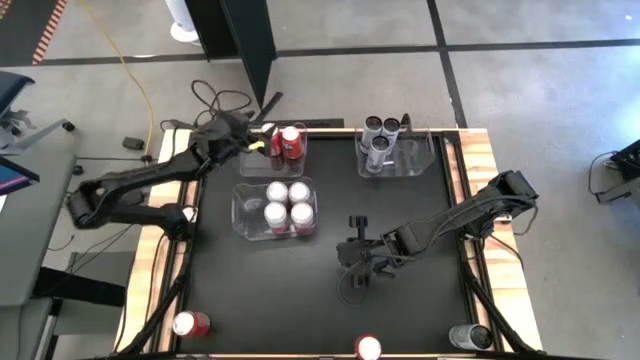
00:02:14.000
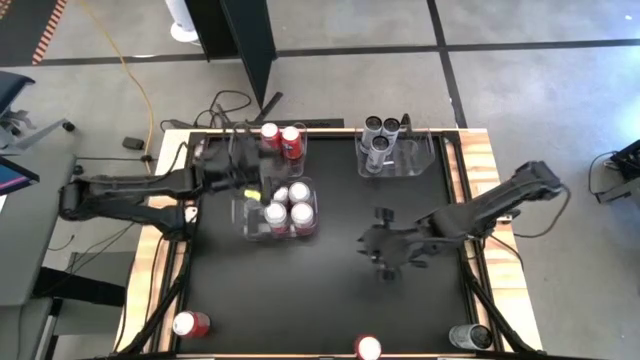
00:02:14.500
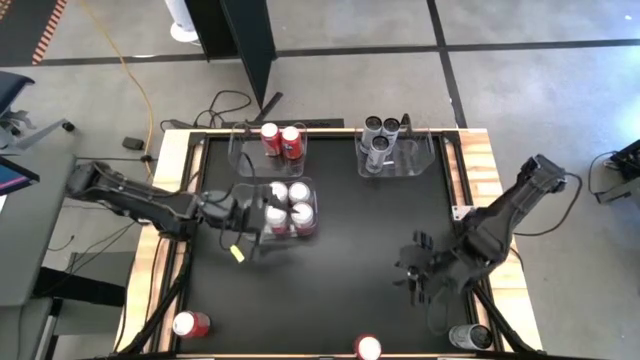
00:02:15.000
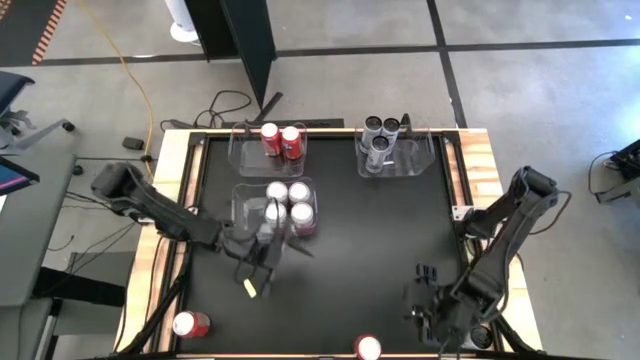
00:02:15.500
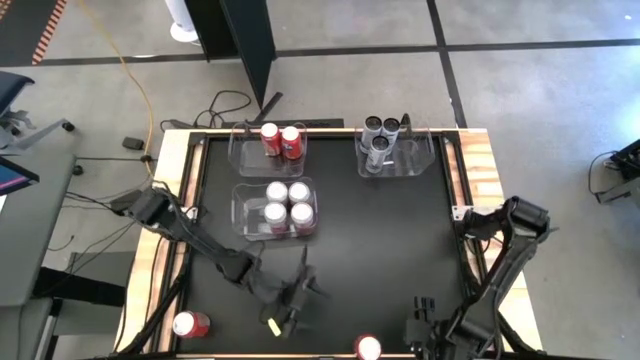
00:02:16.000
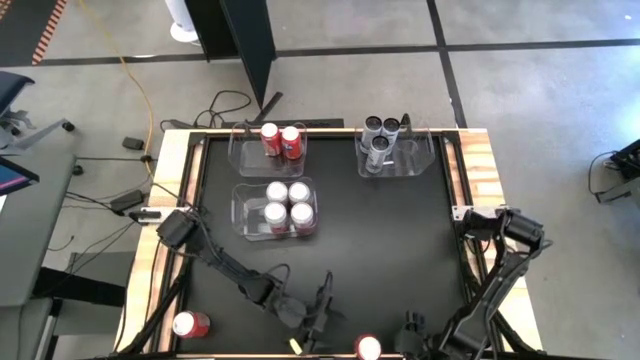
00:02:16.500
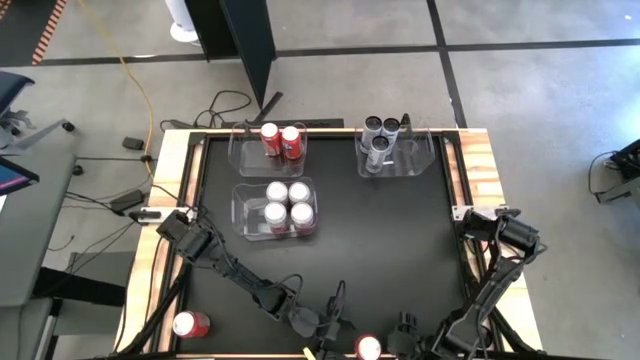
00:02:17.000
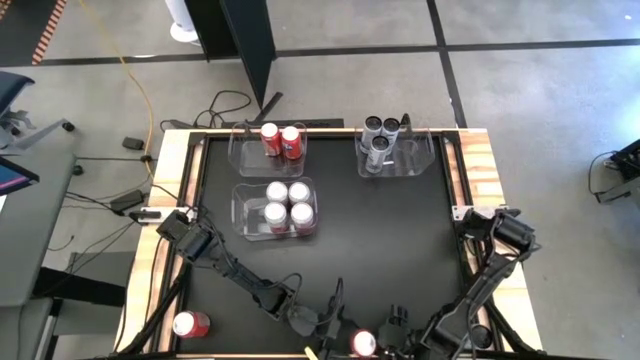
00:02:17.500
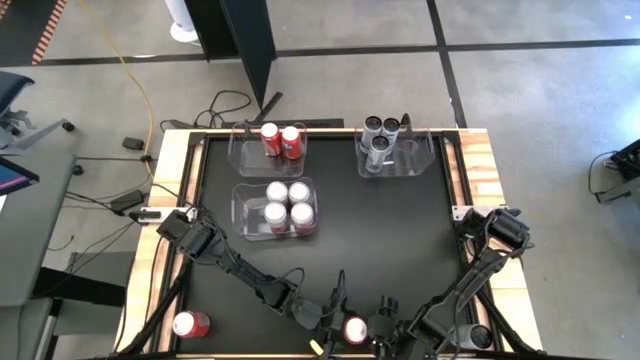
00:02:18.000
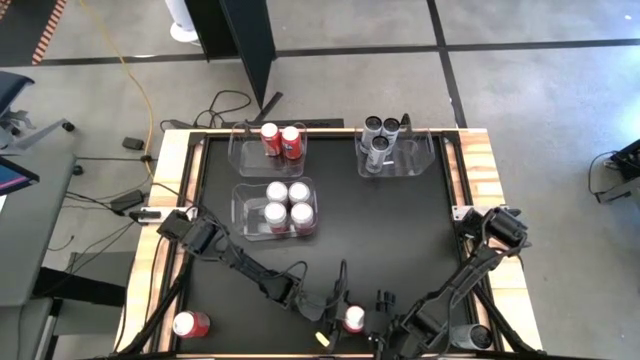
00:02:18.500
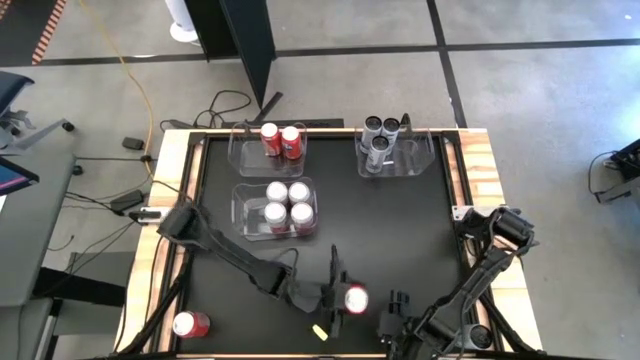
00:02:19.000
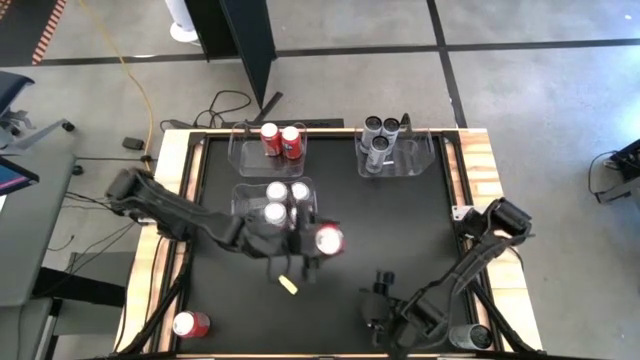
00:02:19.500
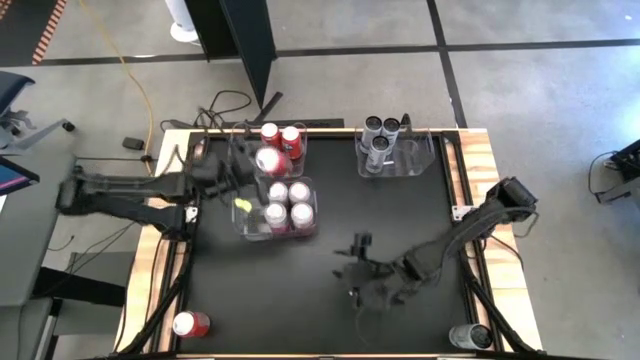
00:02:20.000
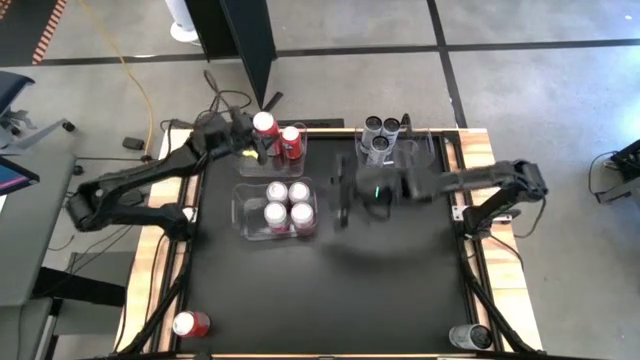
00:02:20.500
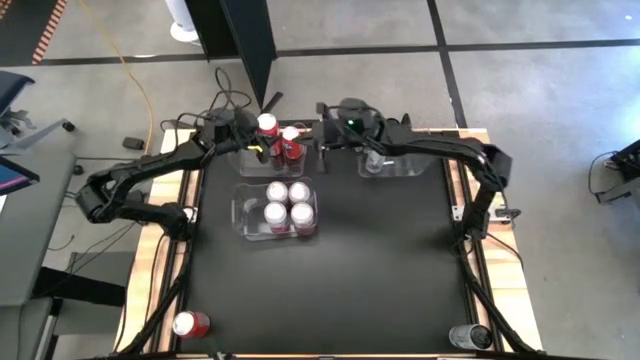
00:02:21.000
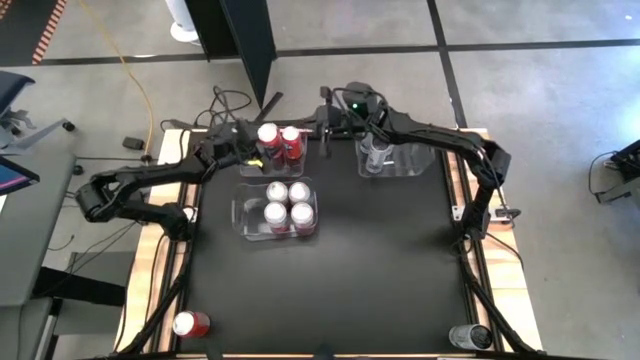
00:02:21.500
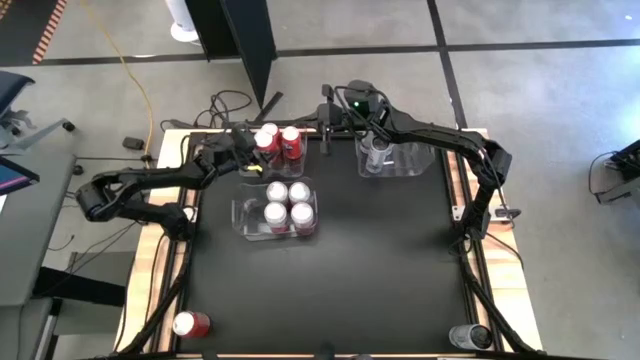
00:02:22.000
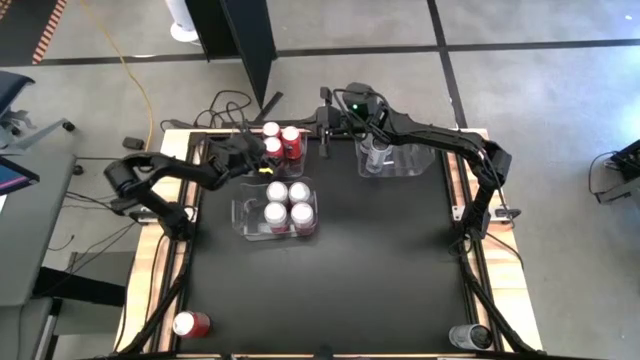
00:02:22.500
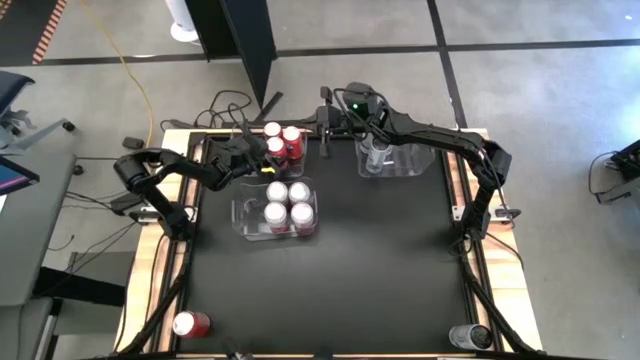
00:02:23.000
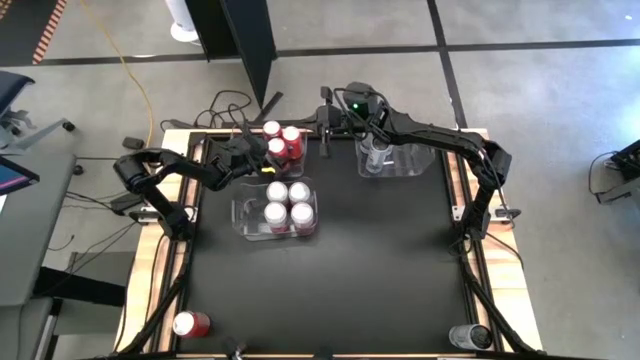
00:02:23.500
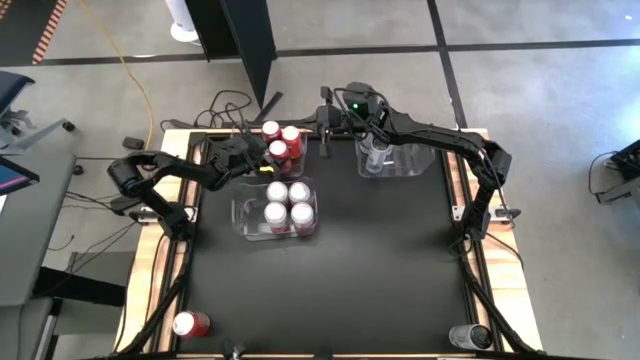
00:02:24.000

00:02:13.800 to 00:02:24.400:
Task: Sort soda cans
Put the right orange soda can into the top left transparent bin

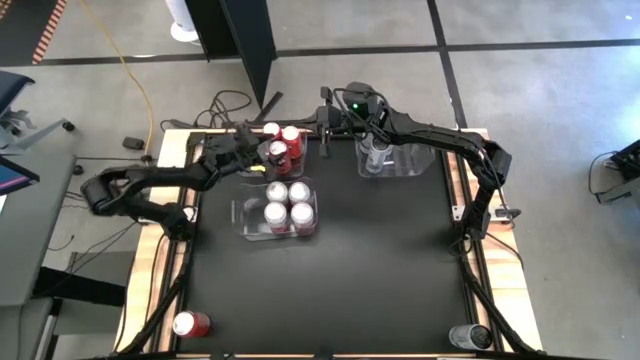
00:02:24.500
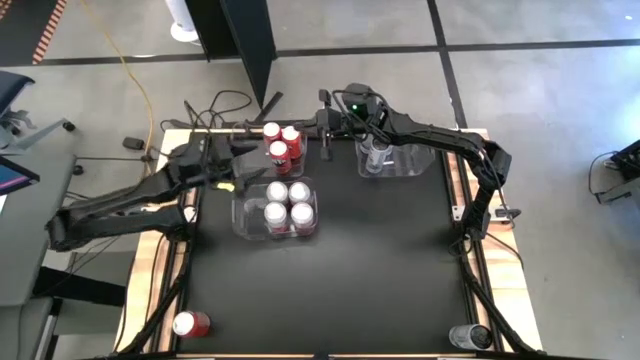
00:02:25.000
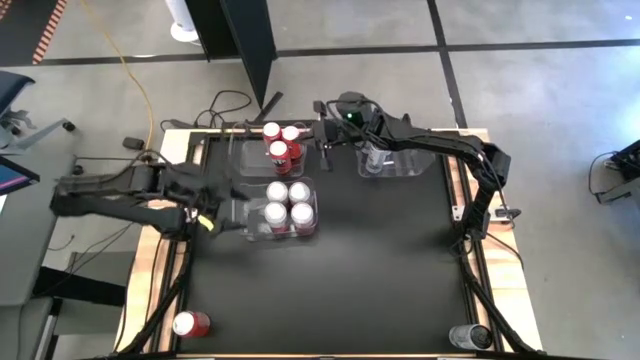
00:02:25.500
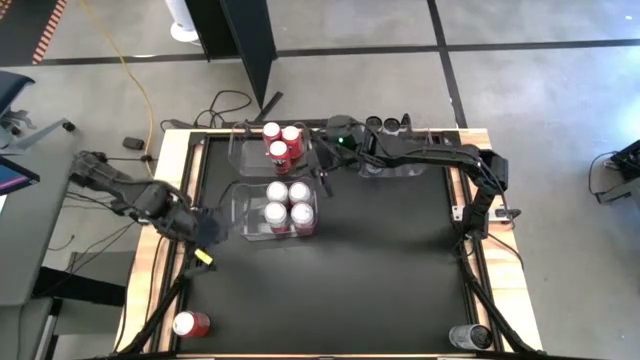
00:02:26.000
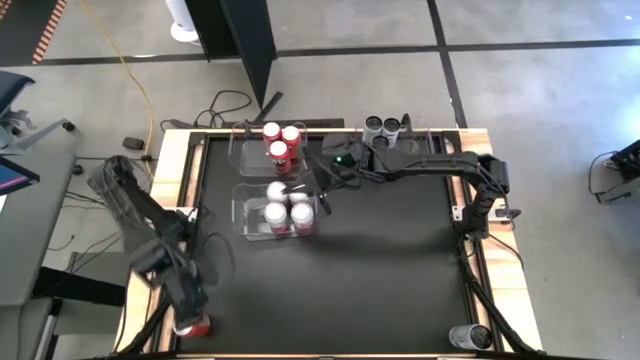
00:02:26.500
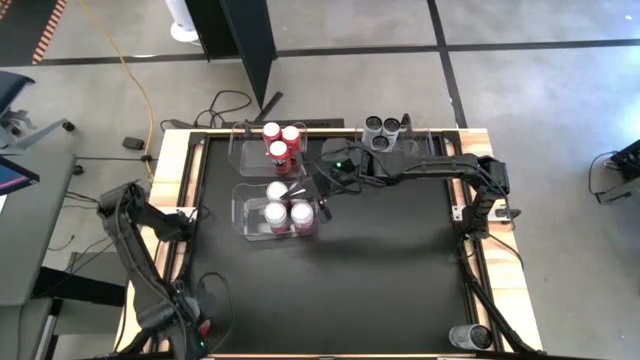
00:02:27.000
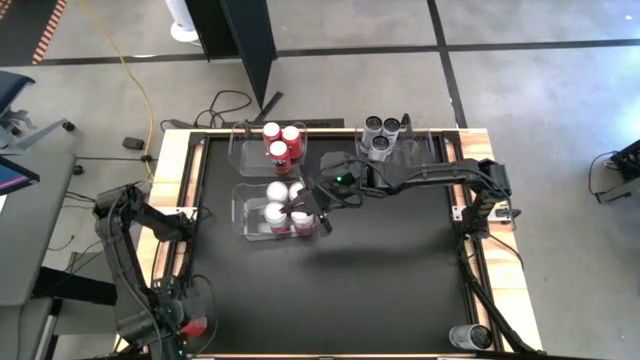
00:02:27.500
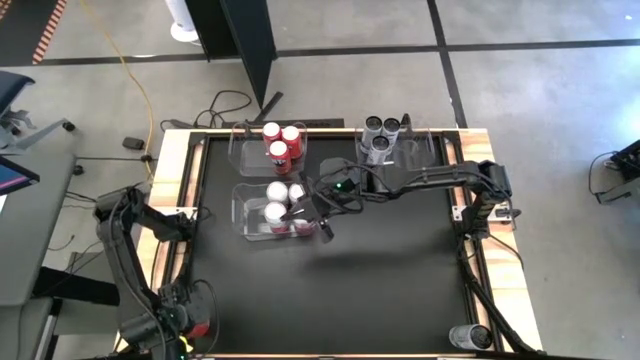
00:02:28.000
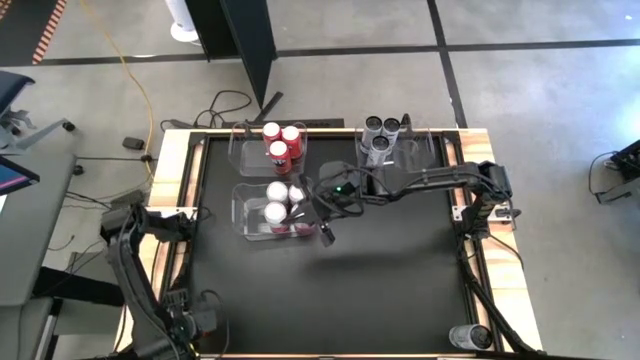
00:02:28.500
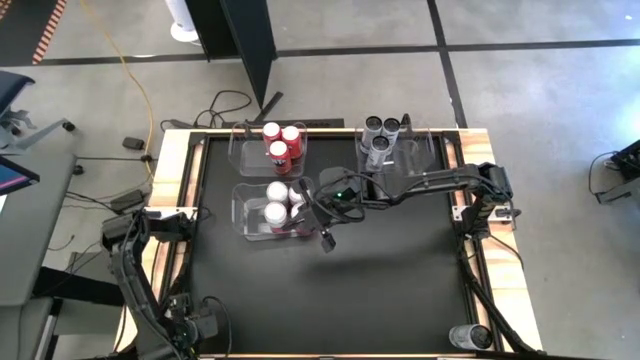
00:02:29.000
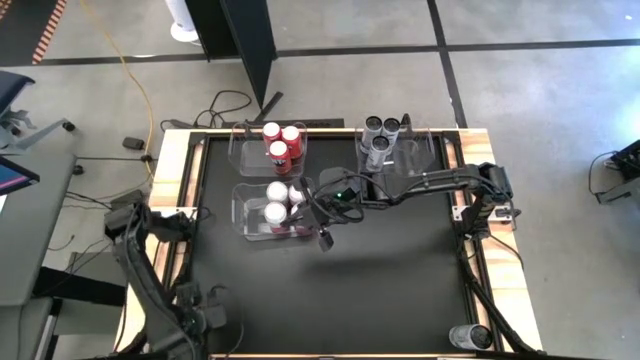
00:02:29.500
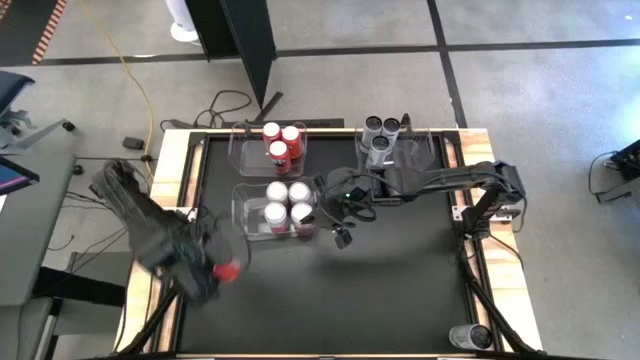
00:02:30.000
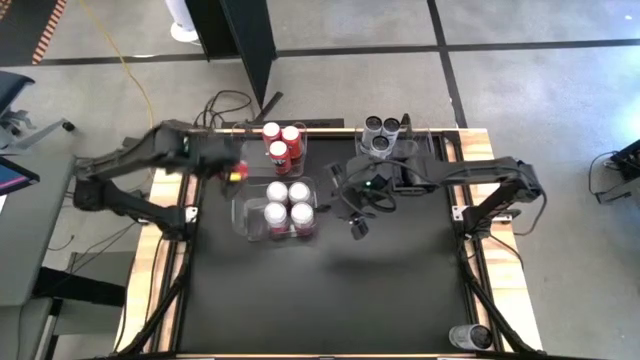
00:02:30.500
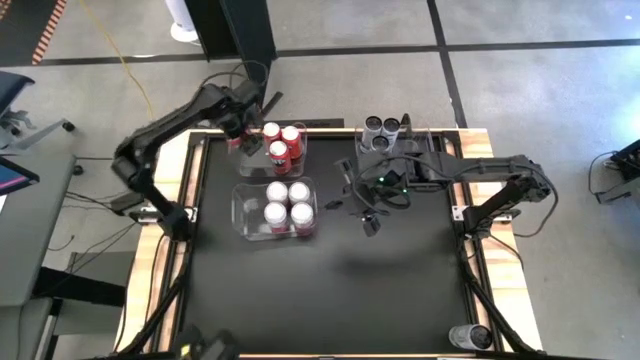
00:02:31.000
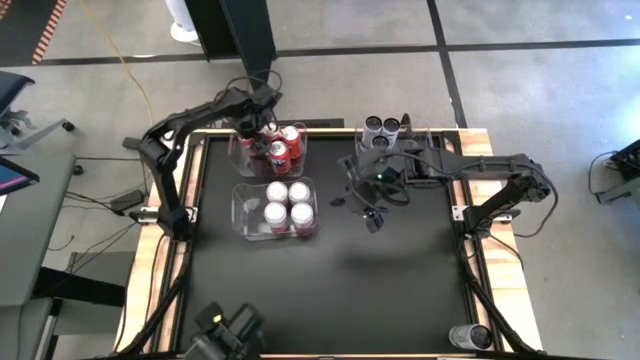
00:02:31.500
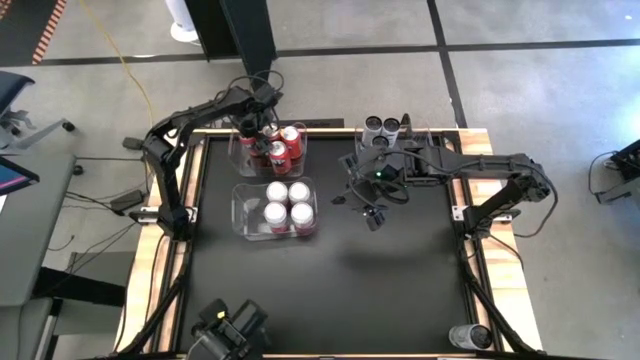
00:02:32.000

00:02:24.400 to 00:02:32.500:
Put the orange soda can into the top left transparent bin

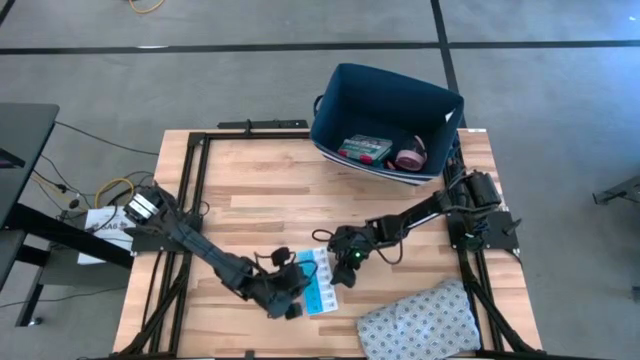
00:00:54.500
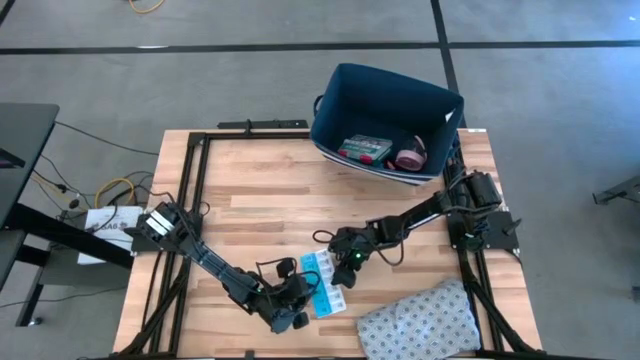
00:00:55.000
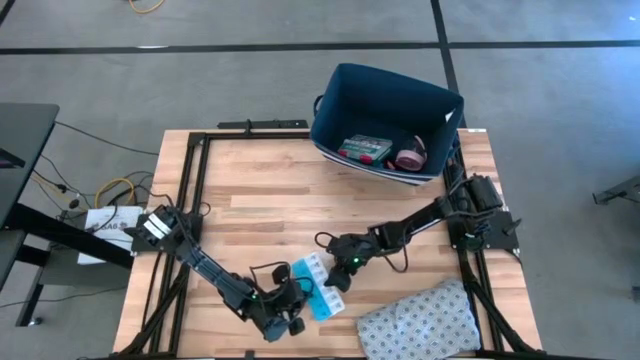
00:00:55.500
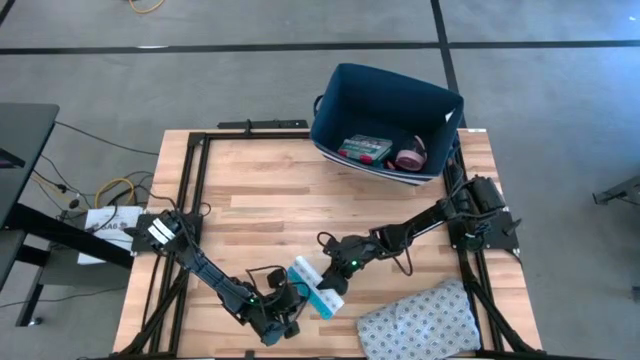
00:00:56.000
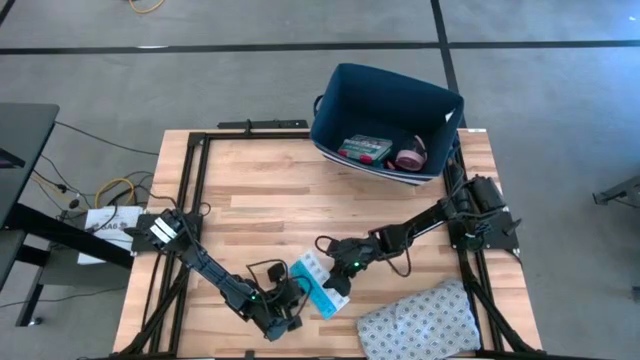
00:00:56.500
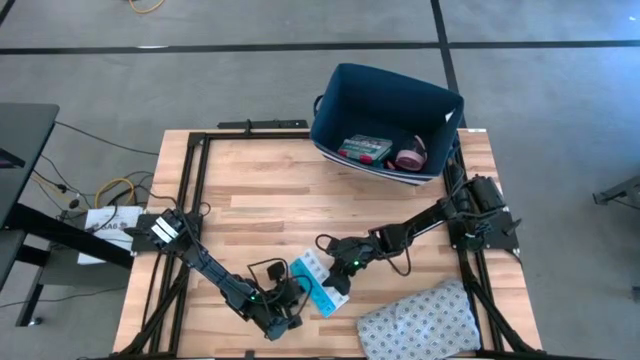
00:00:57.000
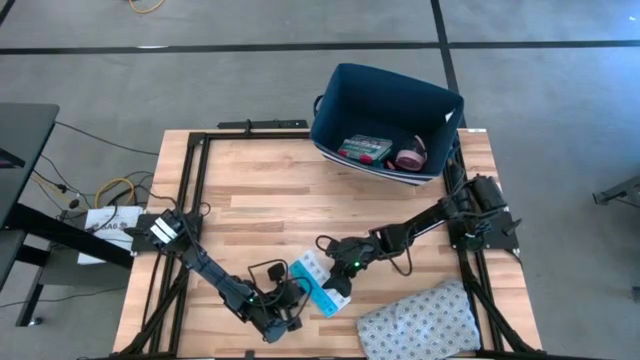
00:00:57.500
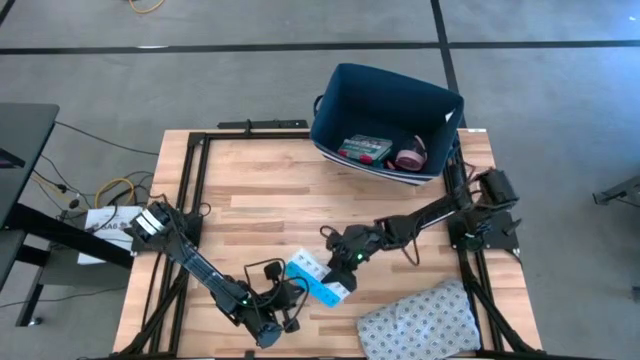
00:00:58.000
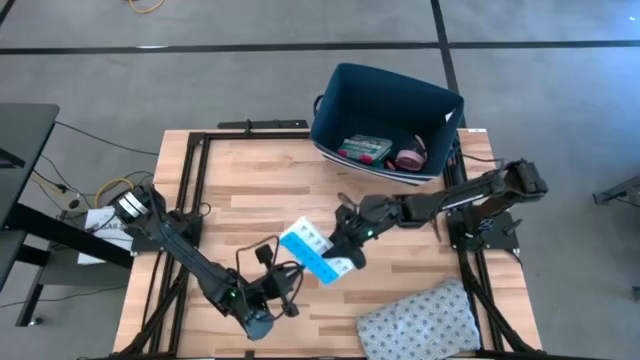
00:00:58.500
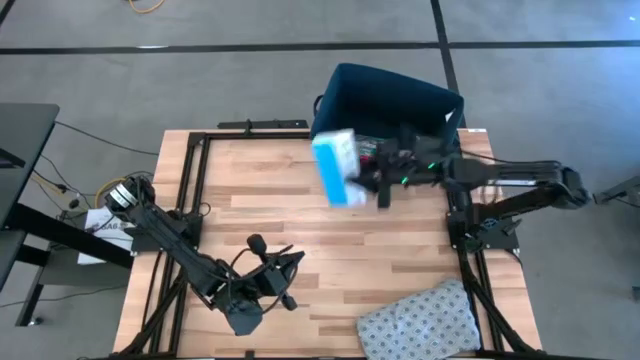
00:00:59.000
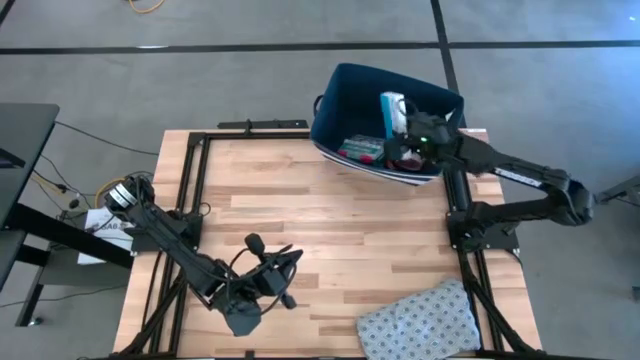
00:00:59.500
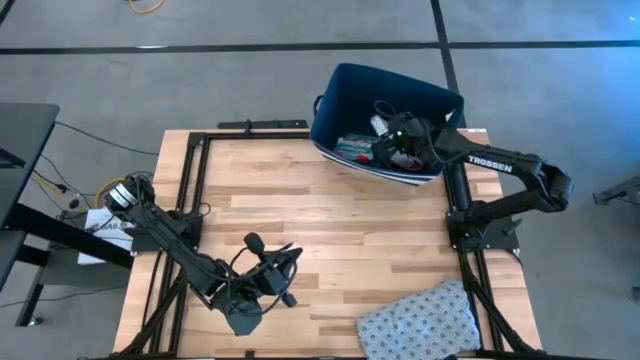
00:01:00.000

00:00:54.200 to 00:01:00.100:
Task: Pick & place medical supplies in basket/bin
Put the pill organizer into the bin
